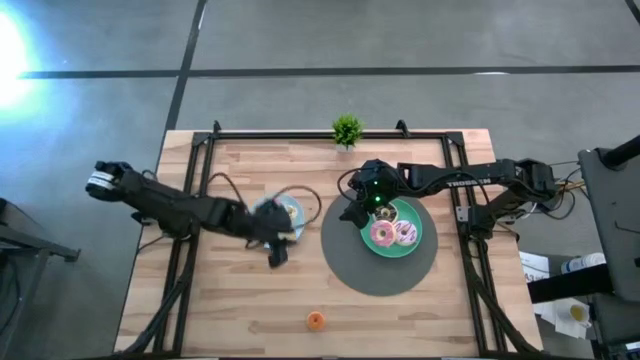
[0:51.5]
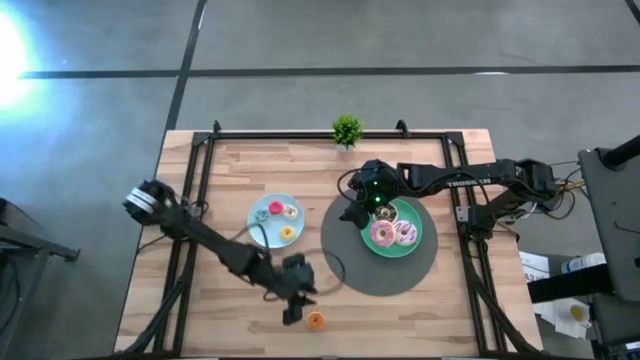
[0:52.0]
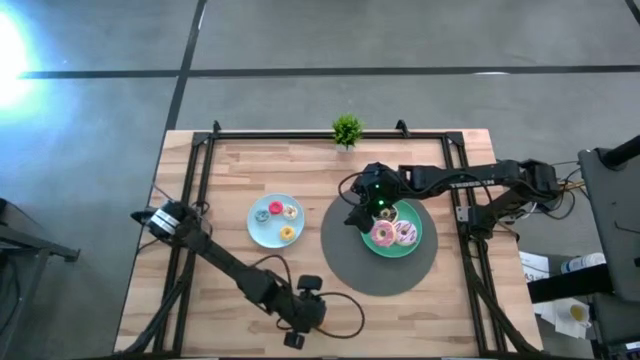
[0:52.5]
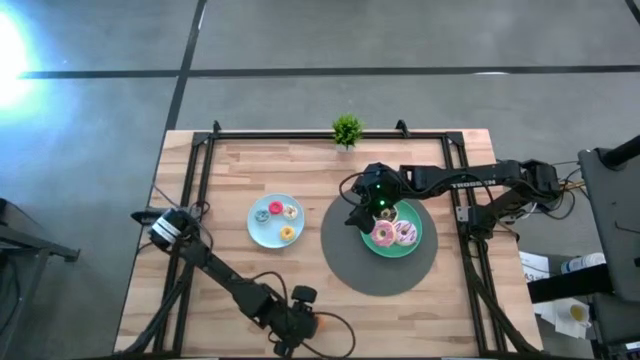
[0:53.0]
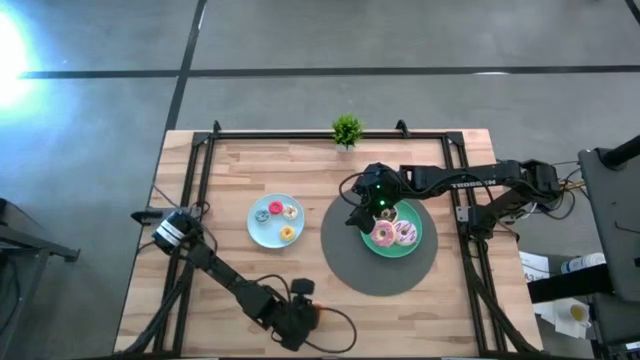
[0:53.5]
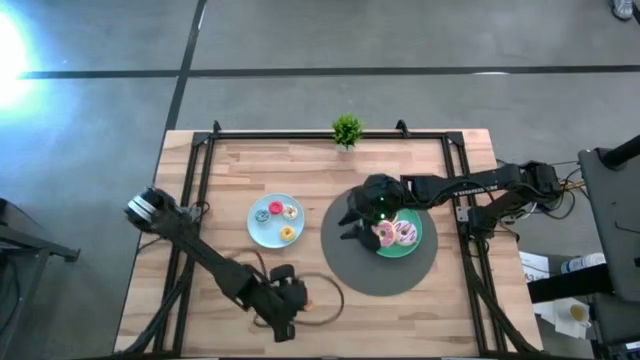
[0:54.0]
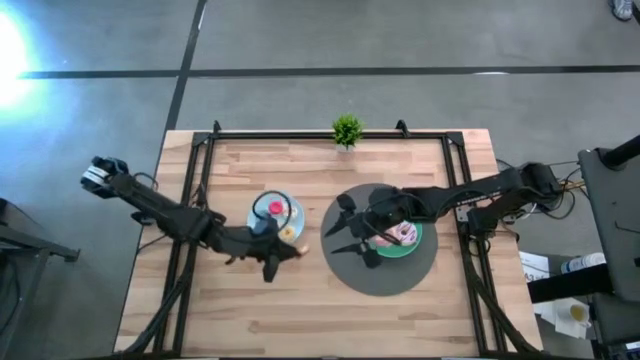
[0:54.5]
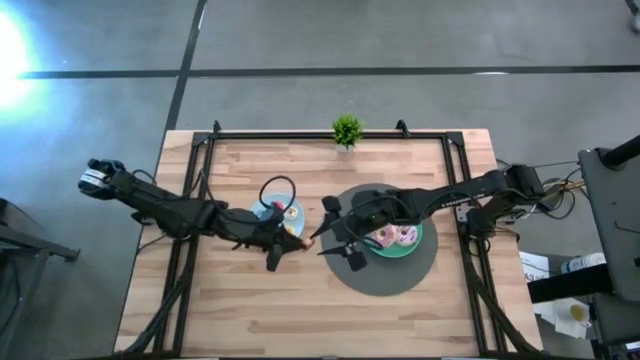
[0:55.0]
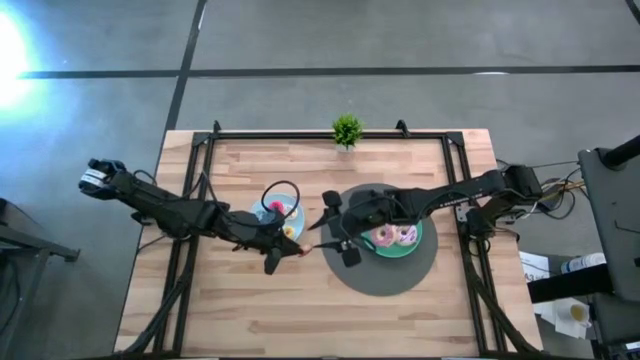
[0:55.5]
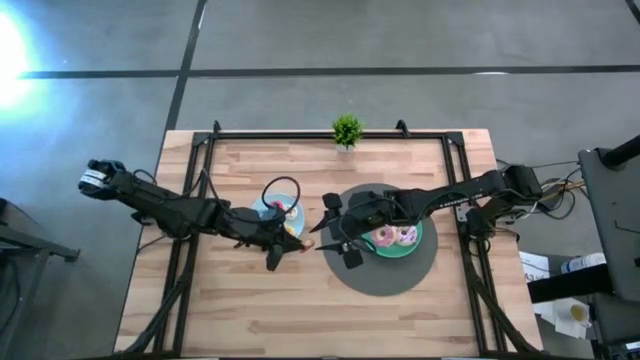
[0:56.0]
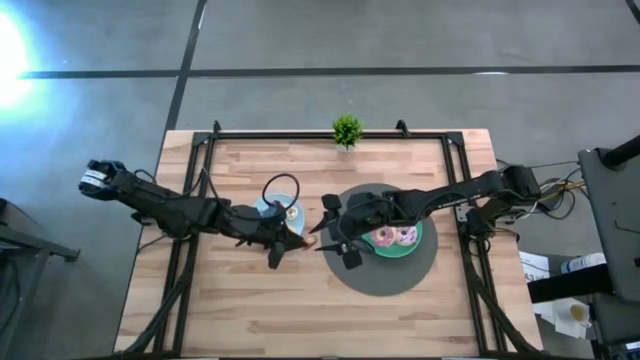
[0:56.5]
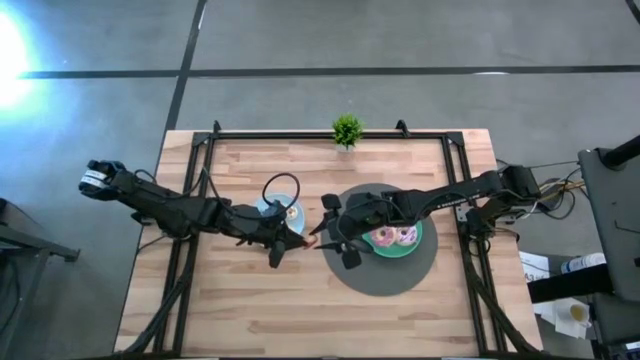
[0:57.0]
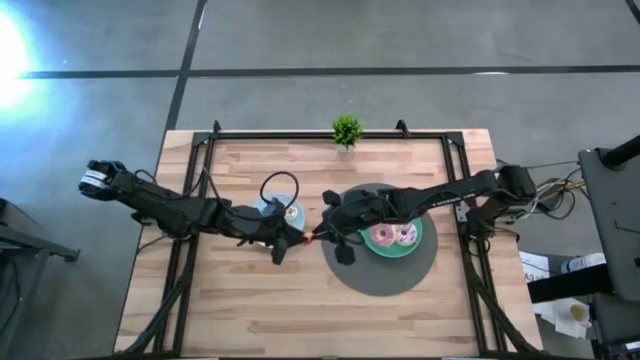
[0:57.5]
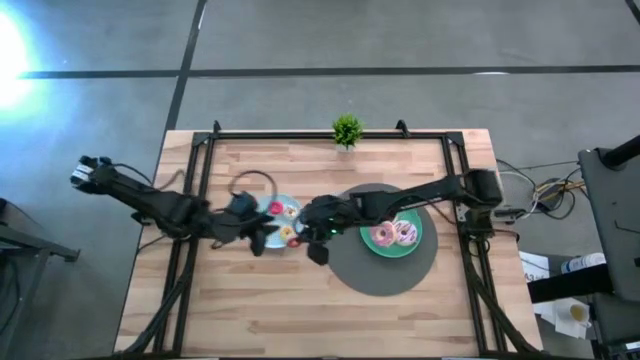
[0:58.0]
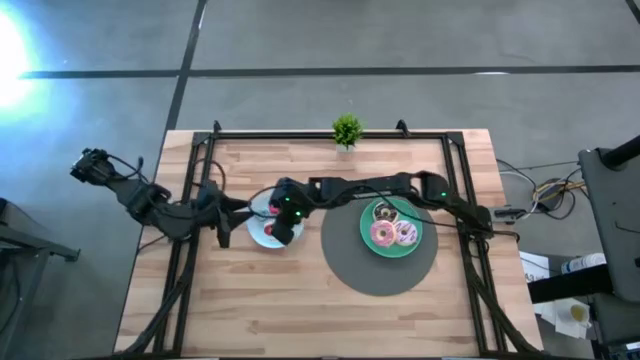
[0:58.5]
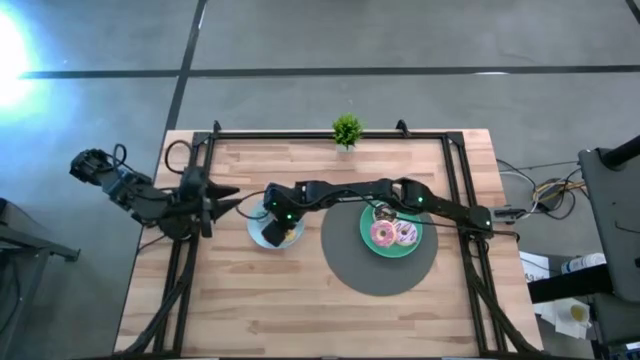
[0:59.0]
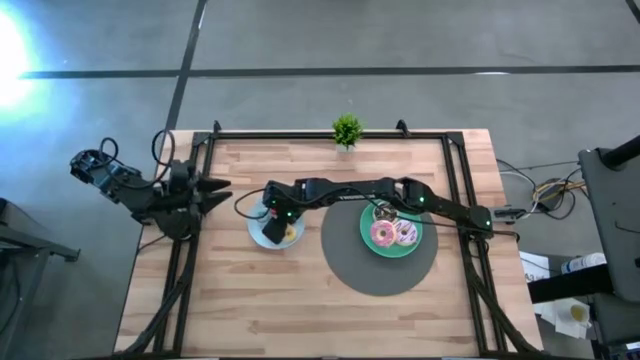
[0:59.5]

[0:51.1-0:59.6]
Task: Pick & Place donuts
Put the small orange donut on the blue plate

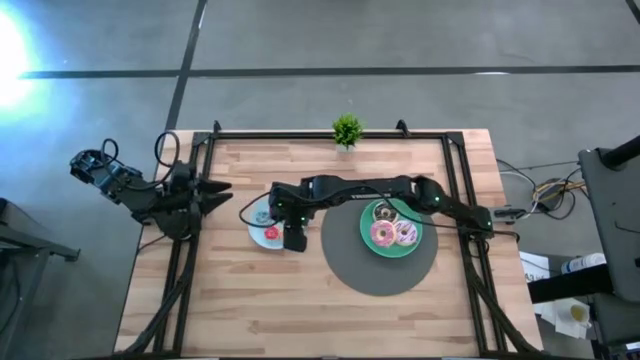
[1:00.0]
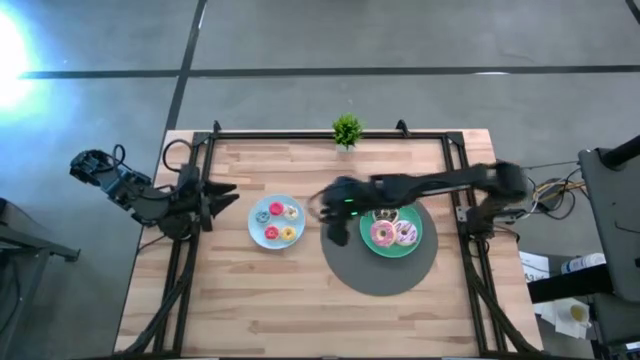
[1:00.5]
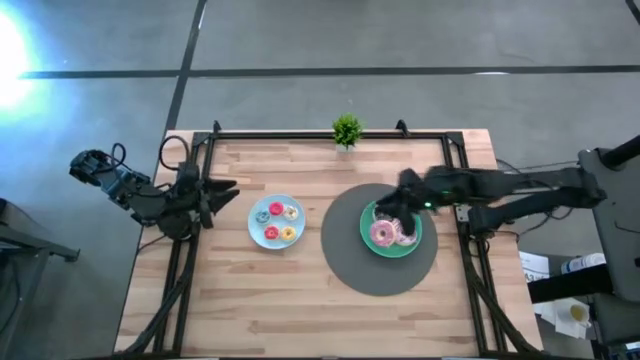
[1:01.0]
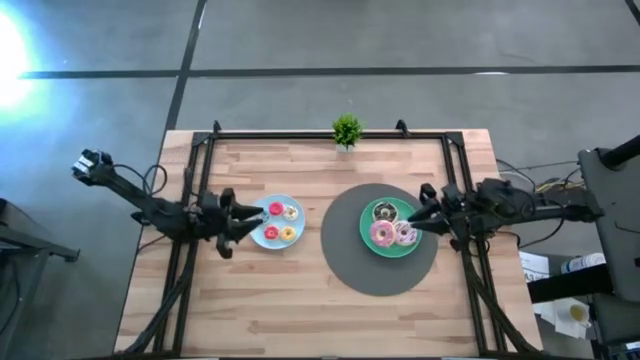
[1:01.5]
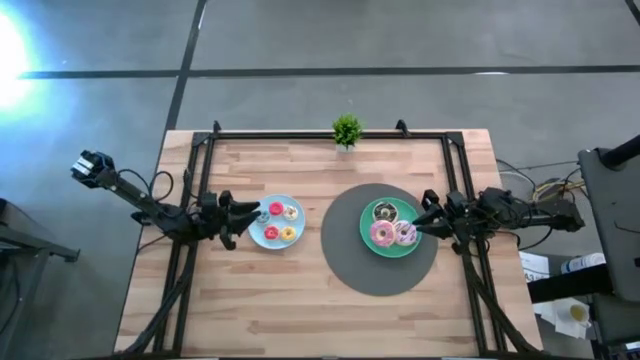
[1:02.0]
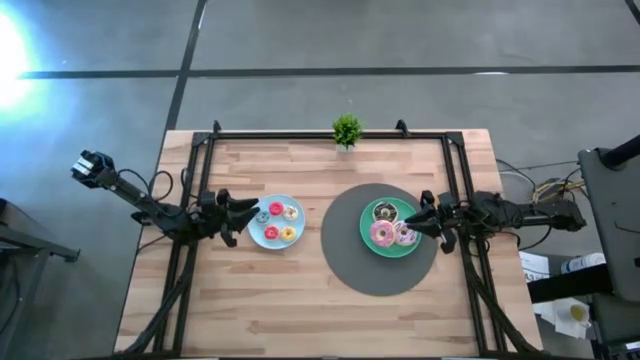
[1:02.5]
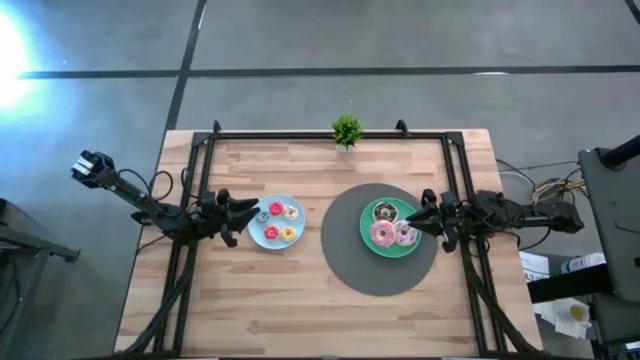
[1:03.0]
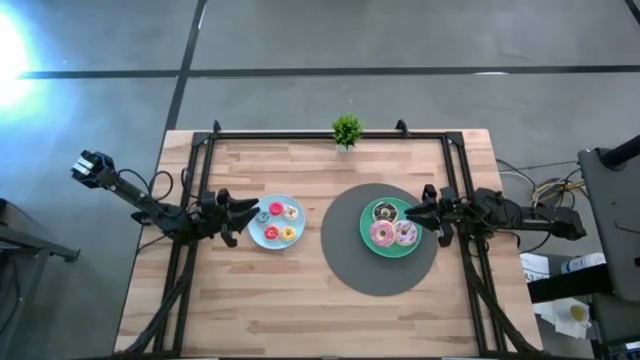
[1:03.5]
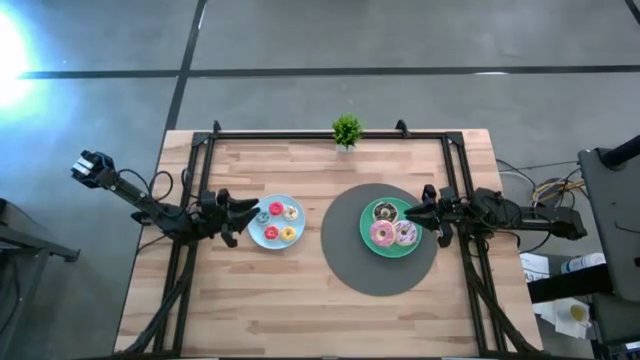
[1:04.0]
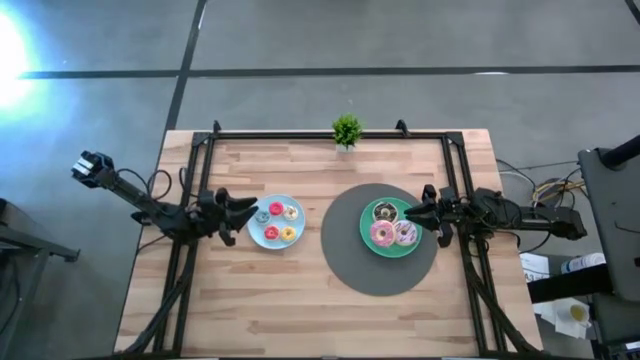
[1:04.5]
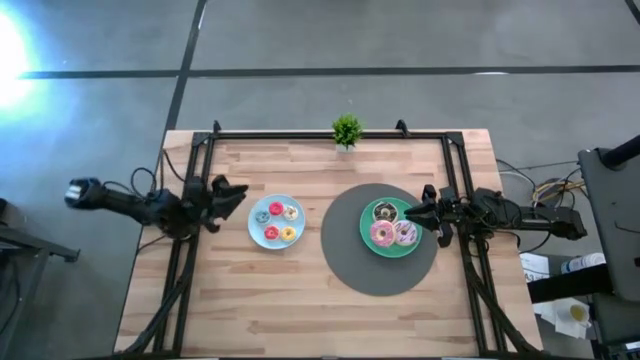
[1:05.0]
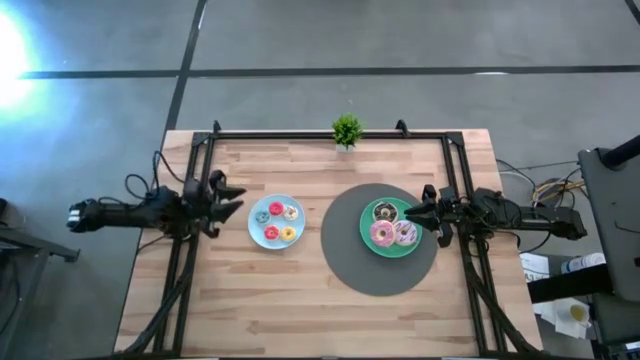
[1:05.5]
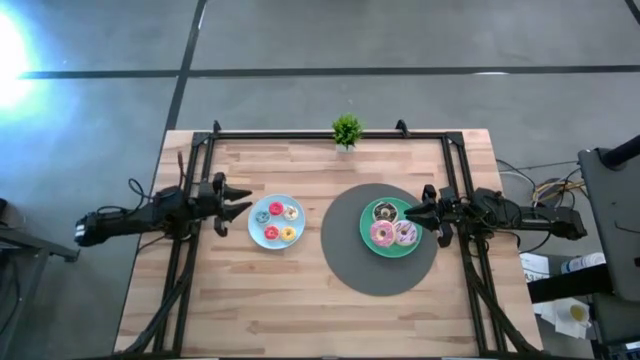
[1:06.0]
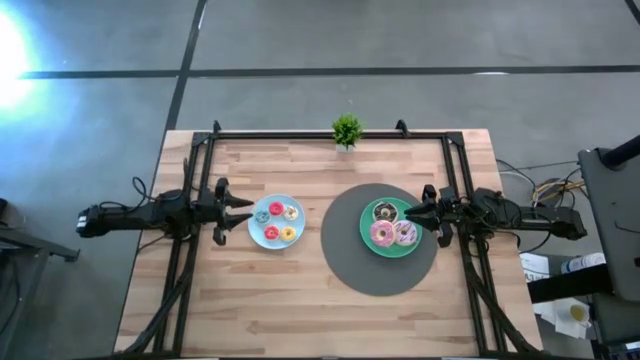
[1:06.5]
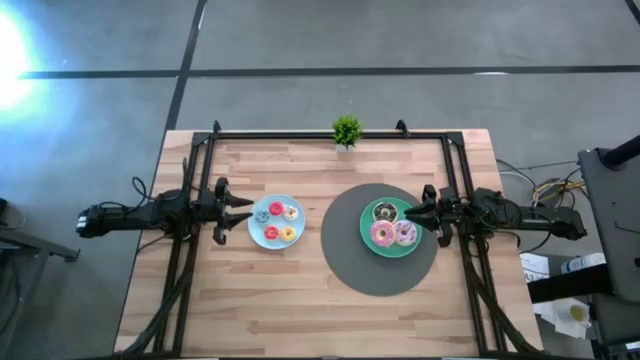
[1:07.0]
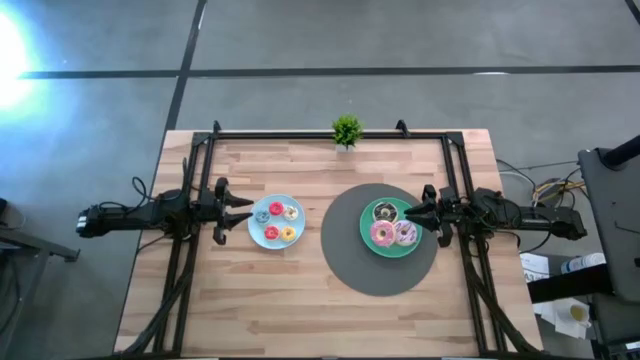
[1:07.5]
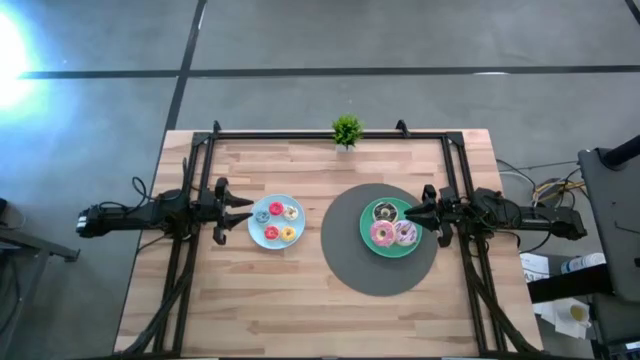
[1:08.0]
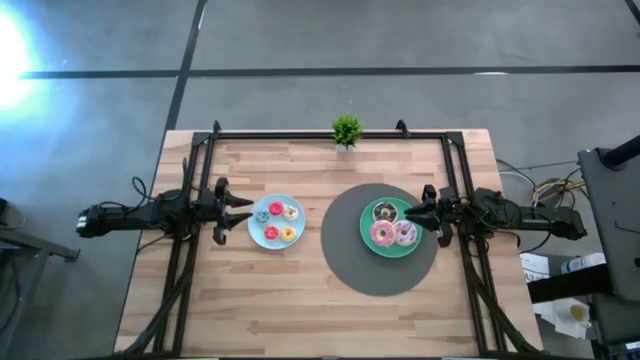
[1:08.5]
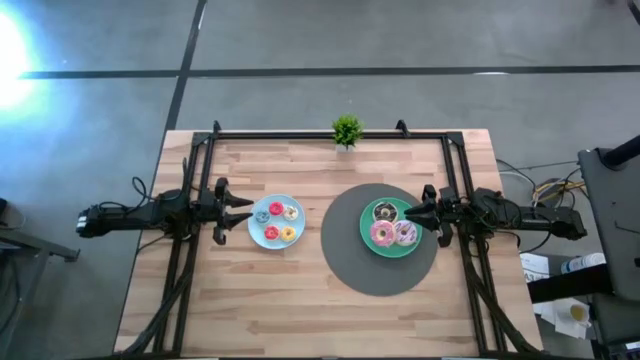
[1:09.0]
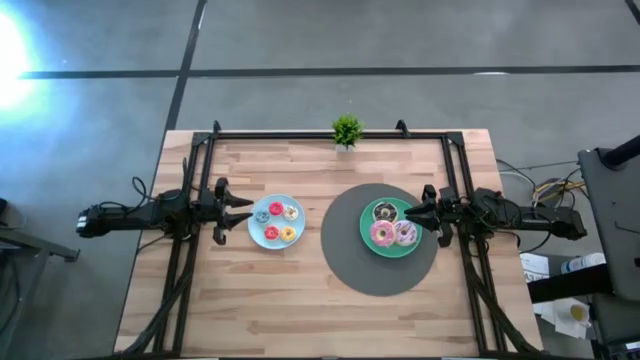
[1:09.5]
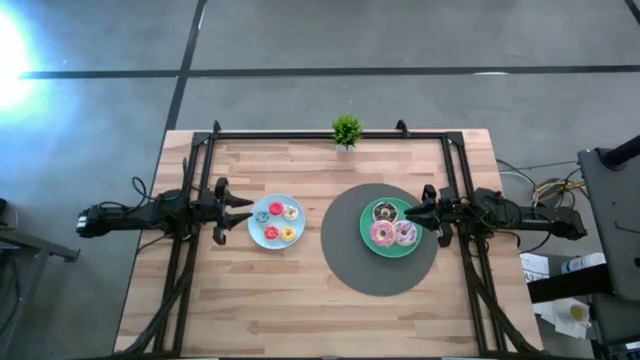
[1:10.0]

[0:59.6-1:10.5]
Return to Home Position

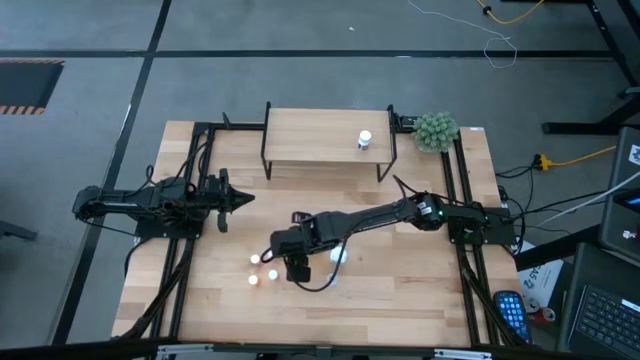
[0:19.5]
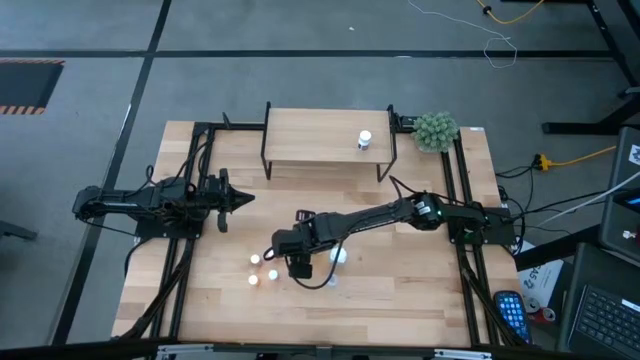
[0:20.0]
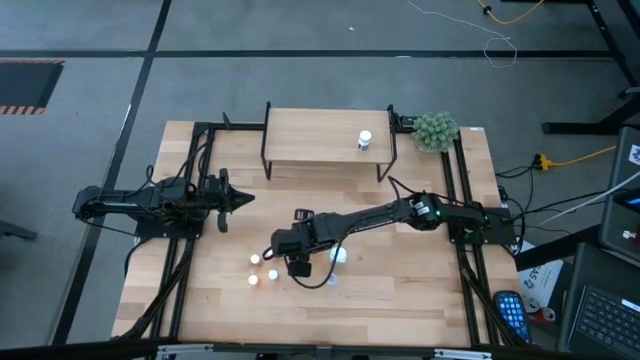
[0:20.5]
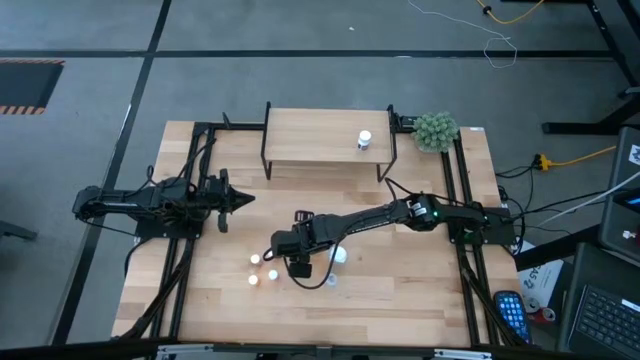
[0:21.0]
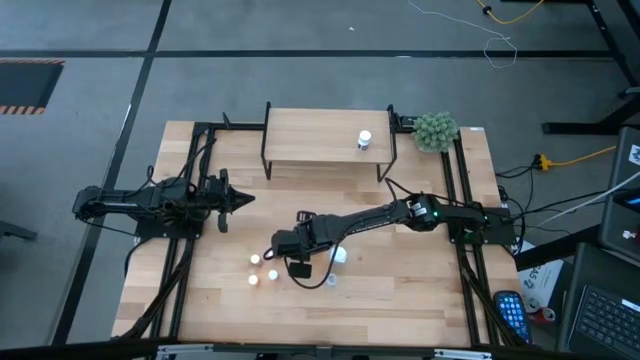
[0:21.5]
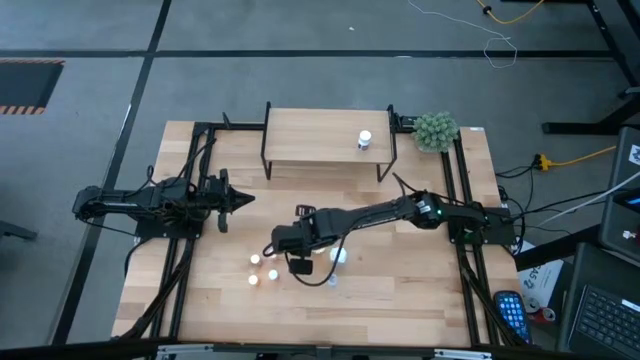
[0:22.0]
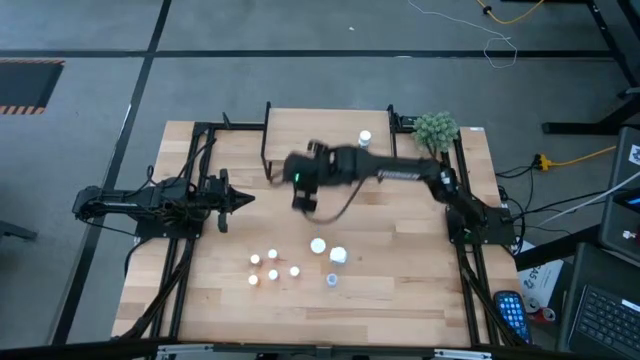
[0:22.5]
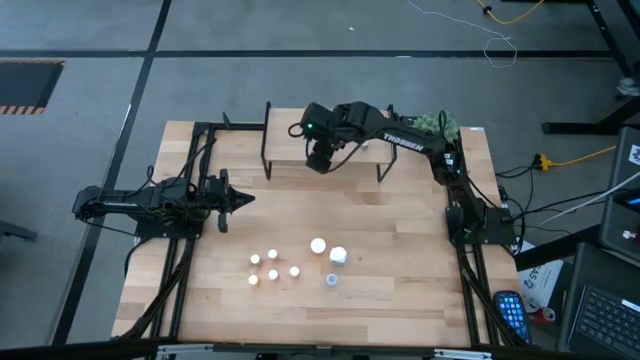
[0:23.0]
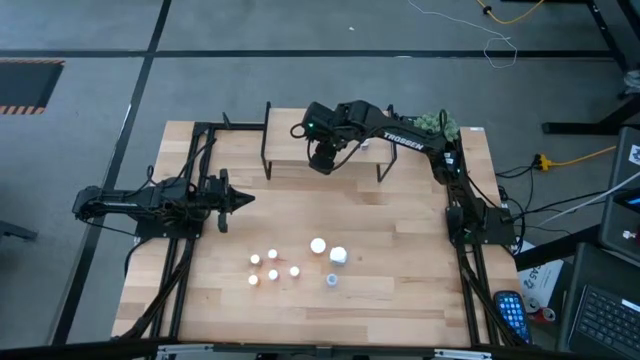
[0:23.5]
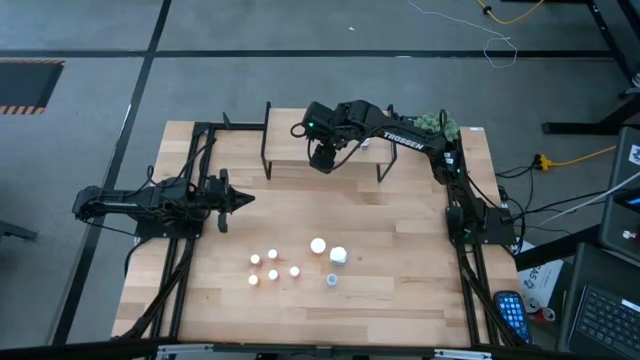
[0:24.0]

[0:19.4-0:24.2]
Task: Pick and place medicine bottles onto shelf by color
Put the light orange pill bottle on the shelf
